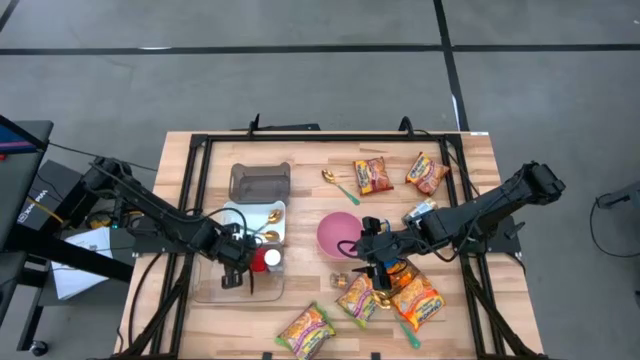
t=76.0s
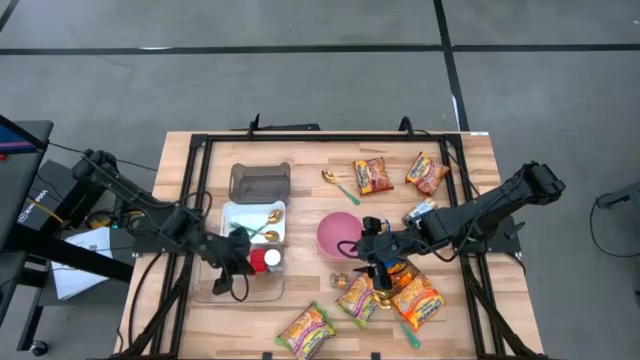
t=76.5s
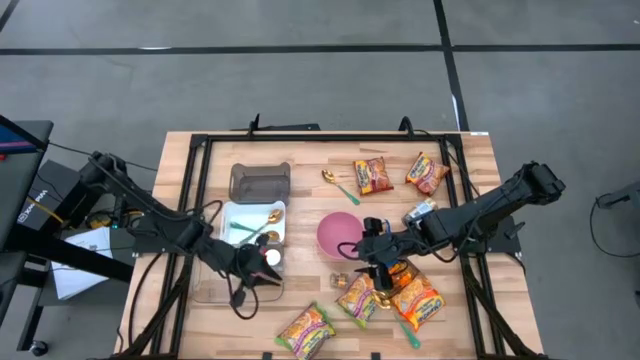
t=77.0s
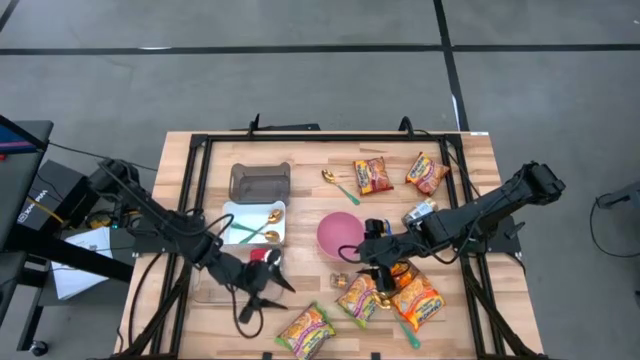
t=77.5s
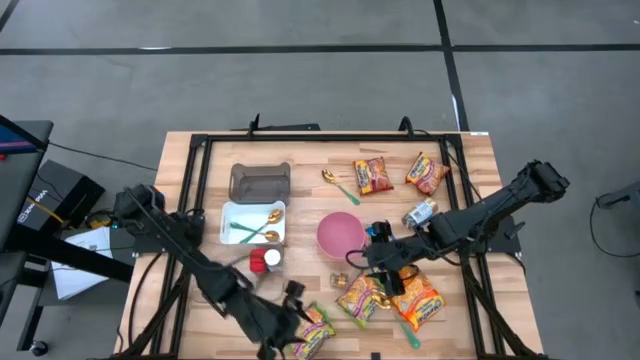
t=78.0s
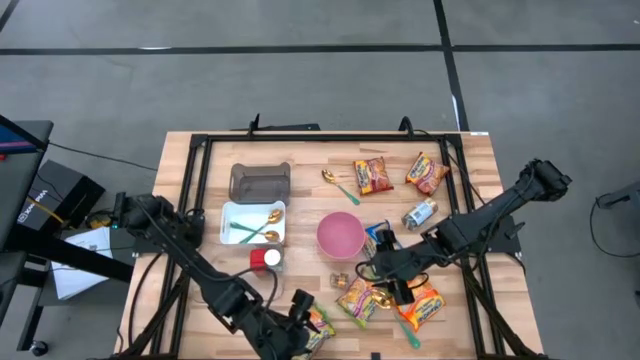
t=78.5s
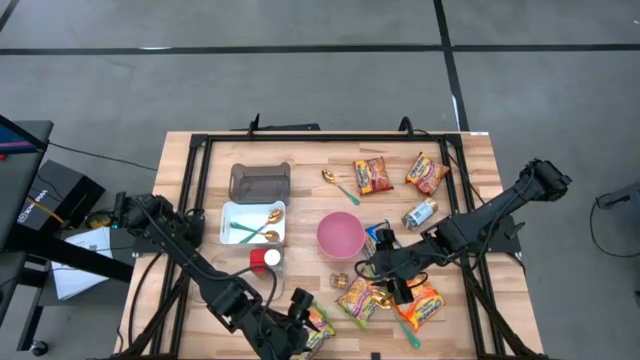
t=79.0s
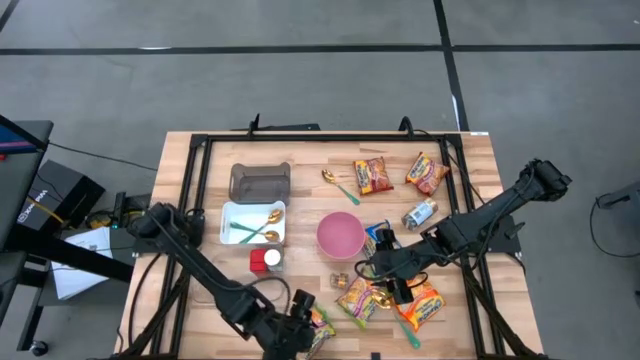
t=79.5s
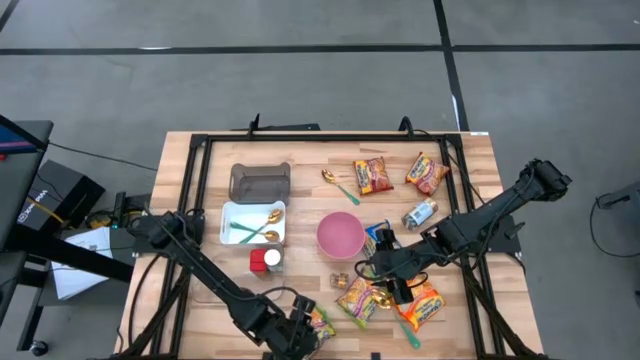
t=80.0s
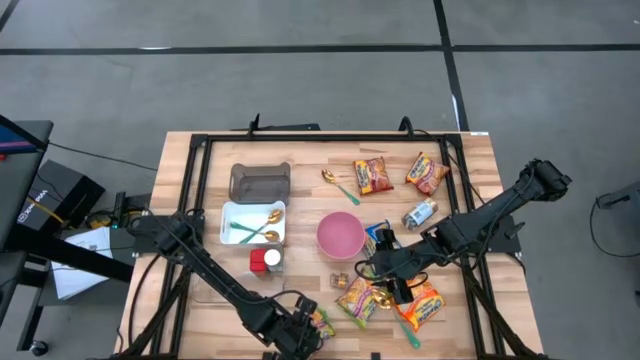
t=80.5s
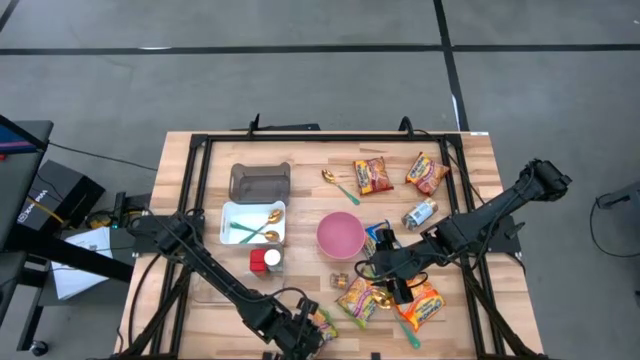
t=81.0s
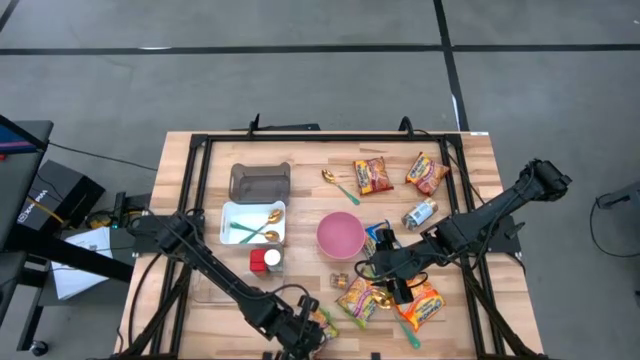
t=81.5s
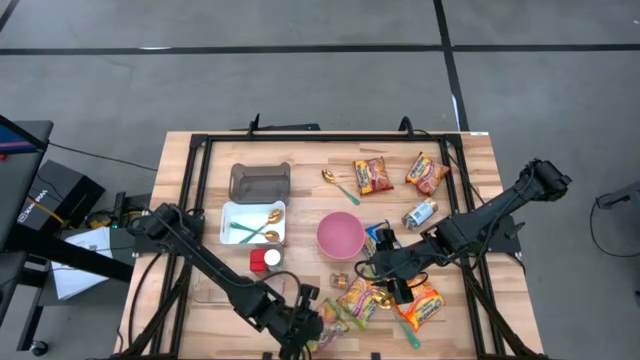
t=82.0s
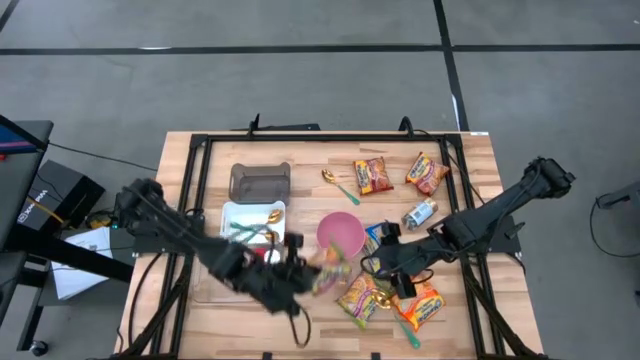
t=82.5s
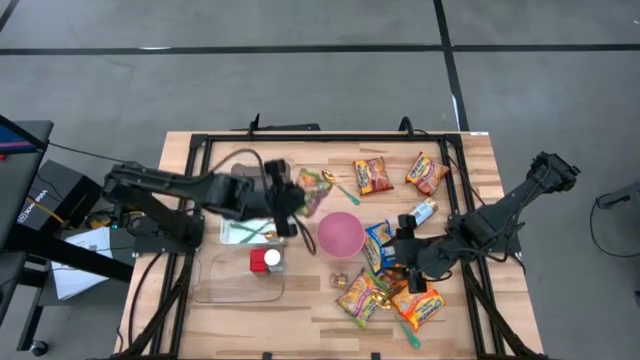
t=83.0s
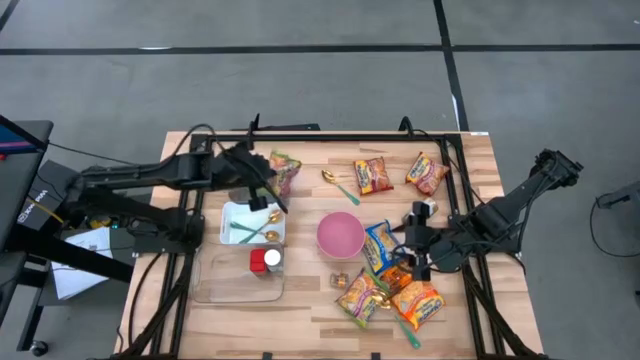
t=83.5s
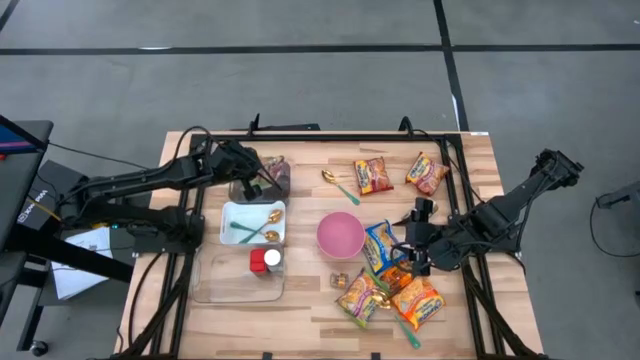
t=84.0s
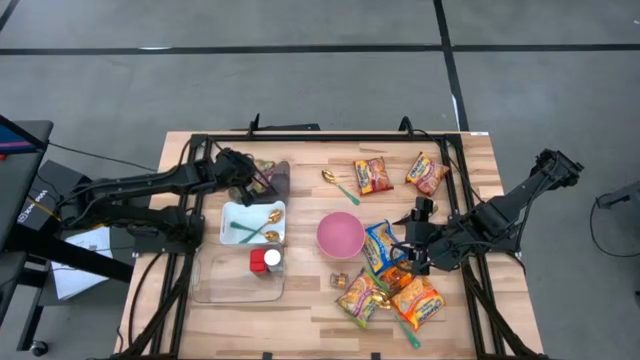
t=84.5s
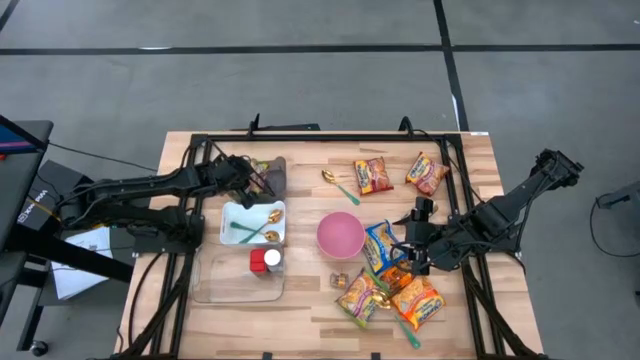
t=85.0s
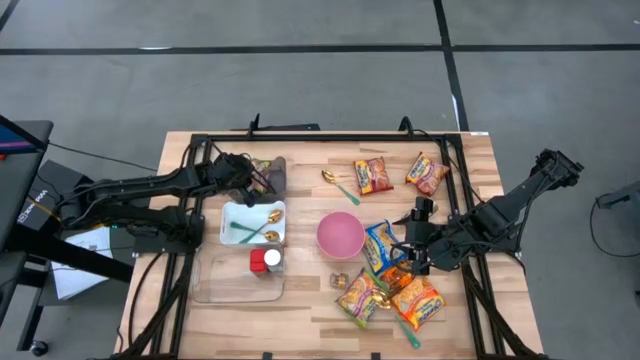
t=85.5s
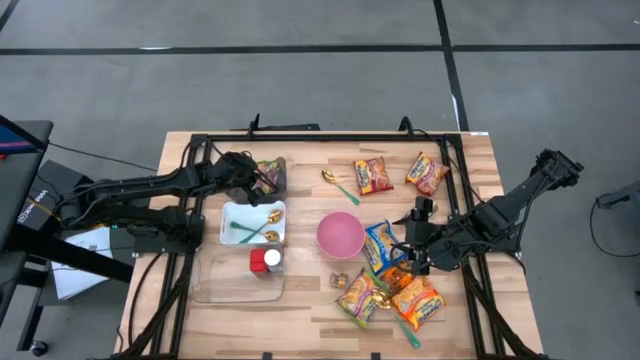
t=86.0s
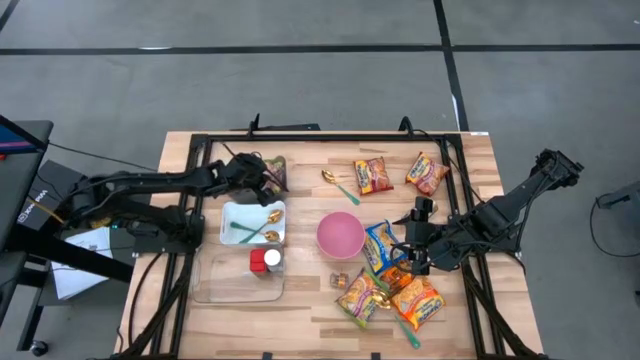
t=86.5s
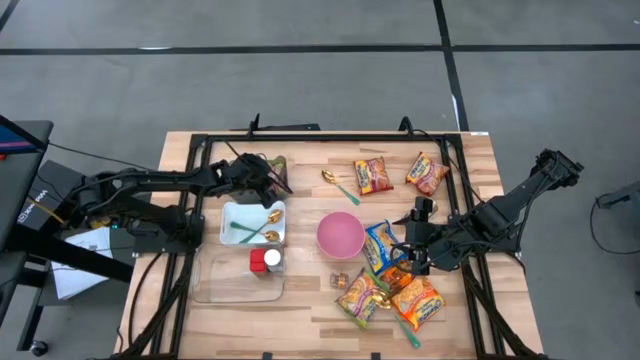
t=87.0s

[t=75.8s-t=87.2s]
Task: Pick & Place Food Item
Put the green noodle pack into the black transparent bin

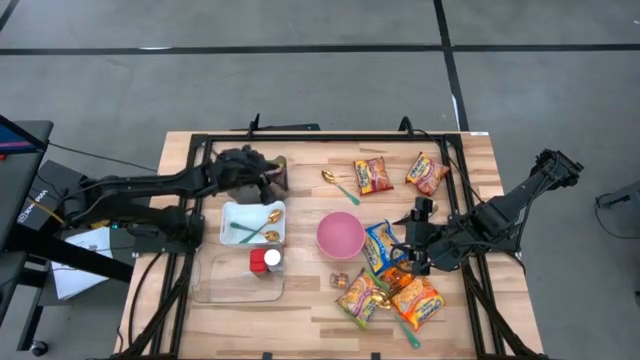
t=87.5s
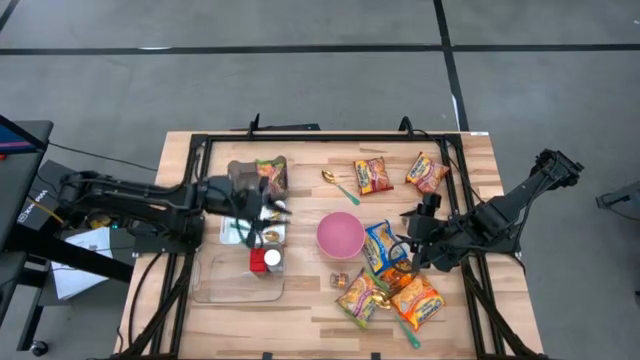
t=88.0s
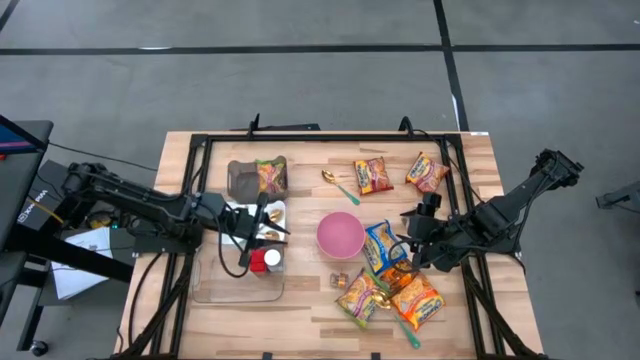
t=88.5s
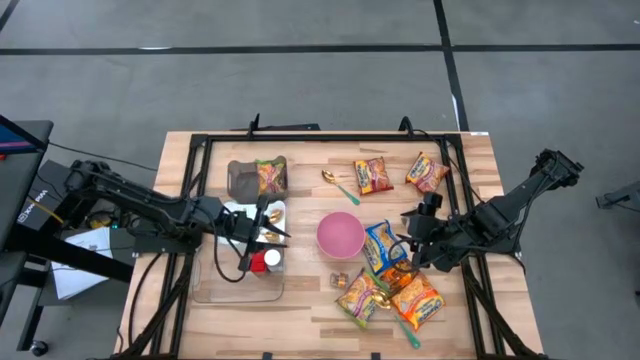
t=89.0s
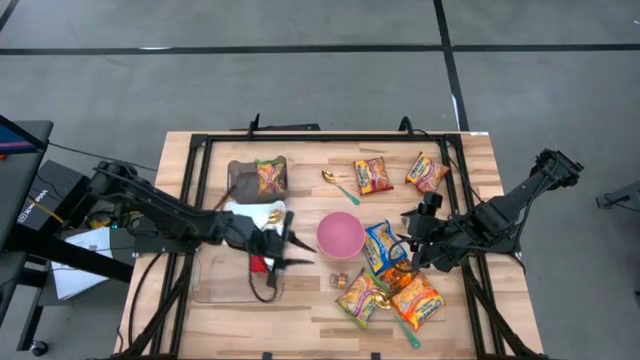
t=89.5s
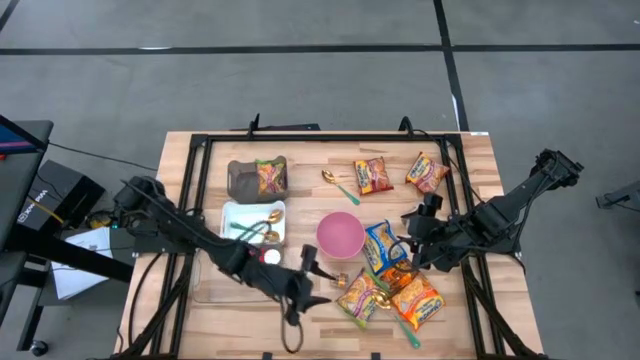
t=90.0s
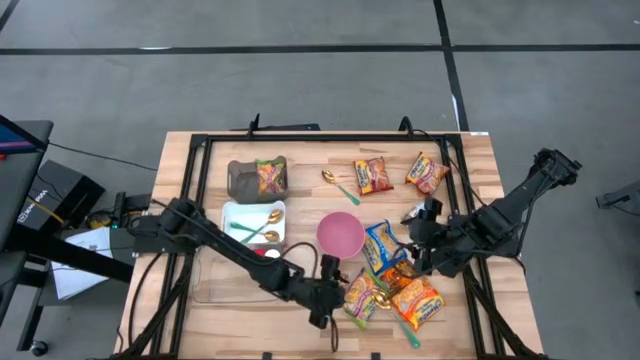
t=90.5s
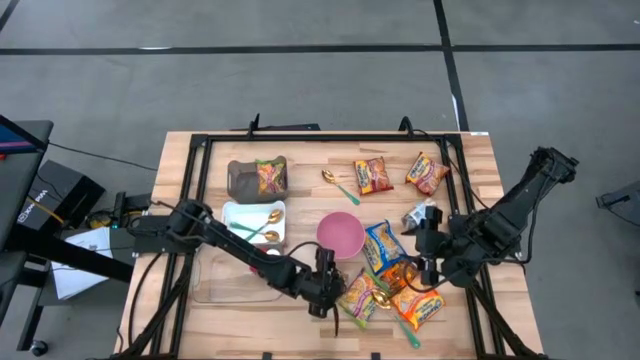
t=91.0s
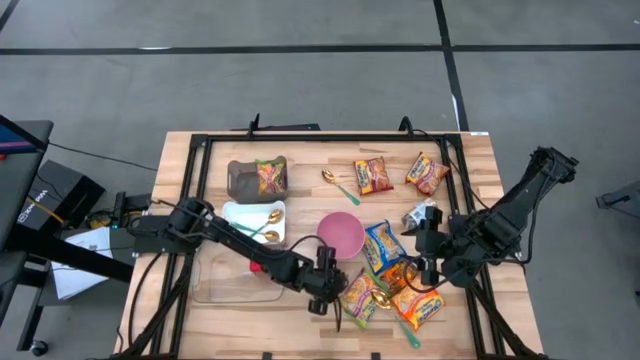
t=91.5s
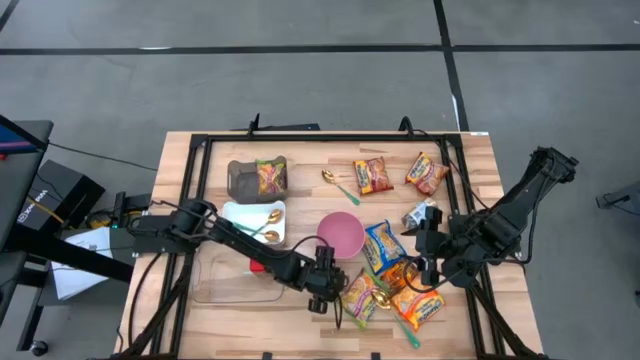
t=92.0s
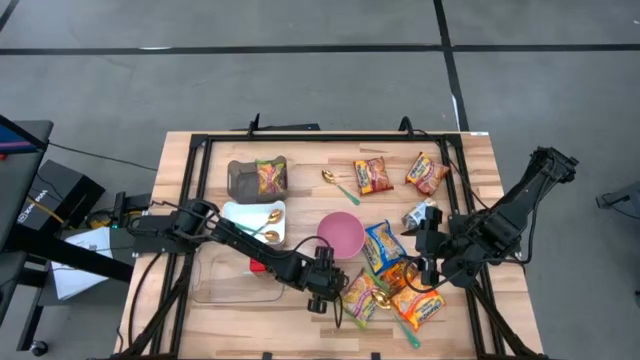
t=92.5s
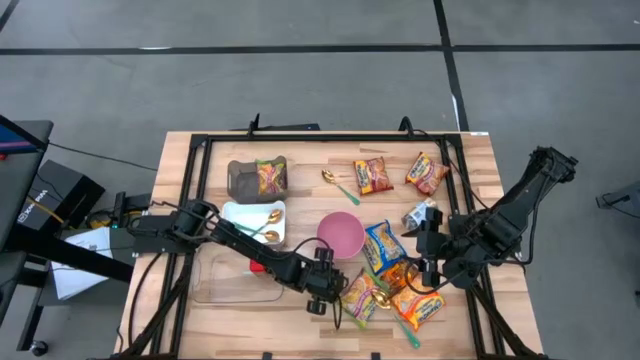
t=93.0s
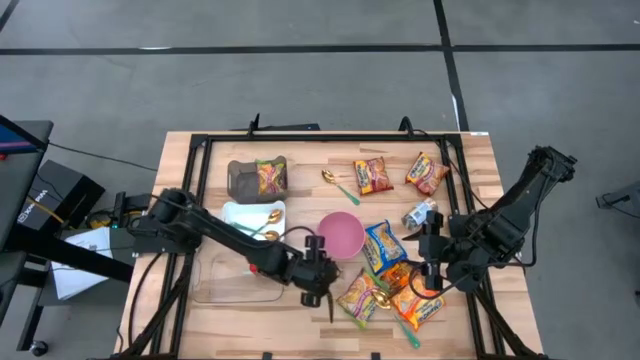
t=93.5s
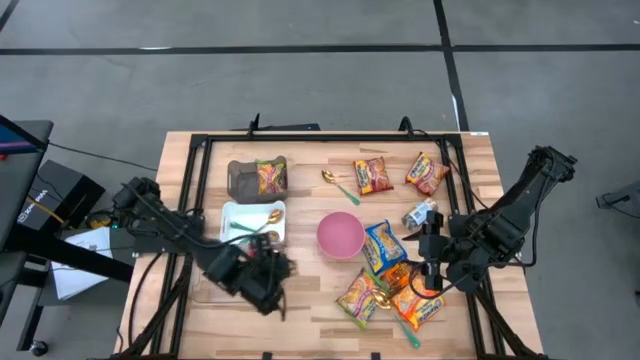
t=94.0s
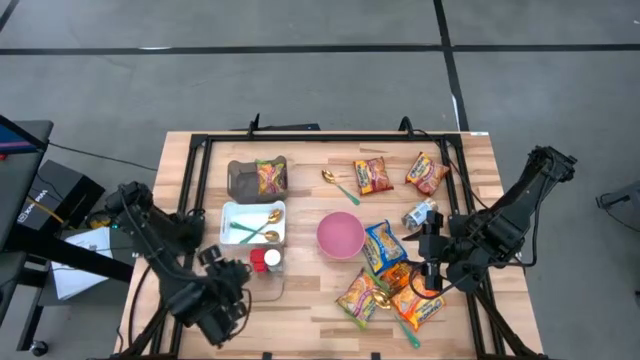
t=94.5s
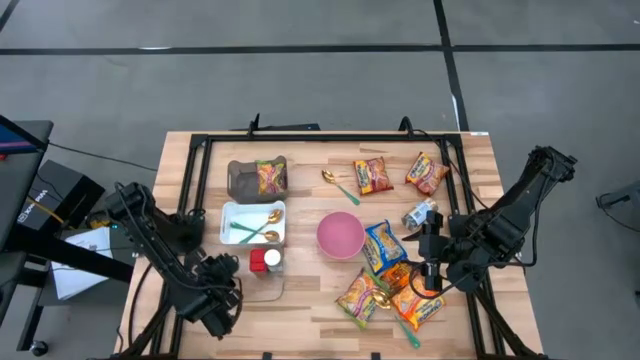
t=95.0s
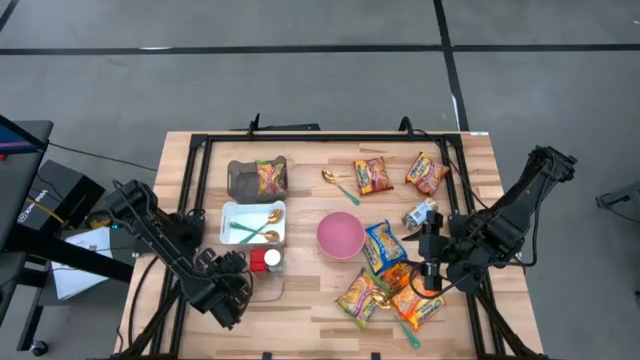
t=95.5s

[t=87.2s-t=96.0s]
Put the brown spice bottle into the transparent bin

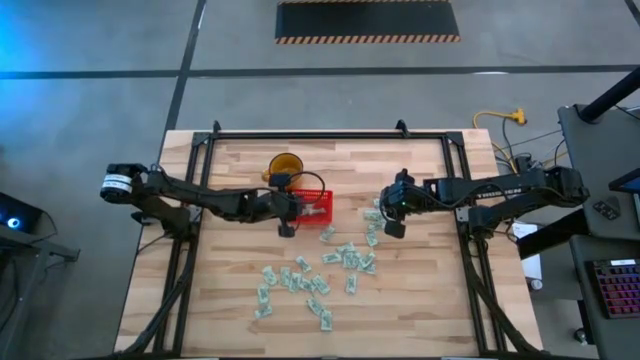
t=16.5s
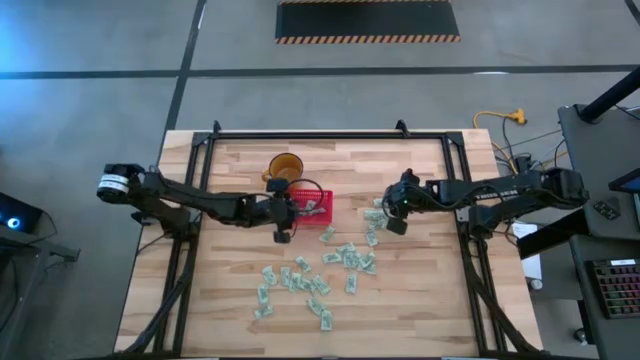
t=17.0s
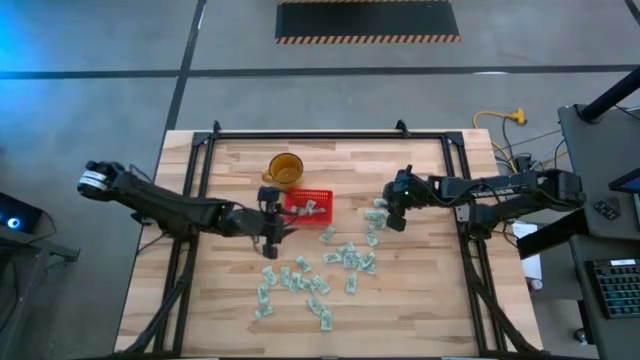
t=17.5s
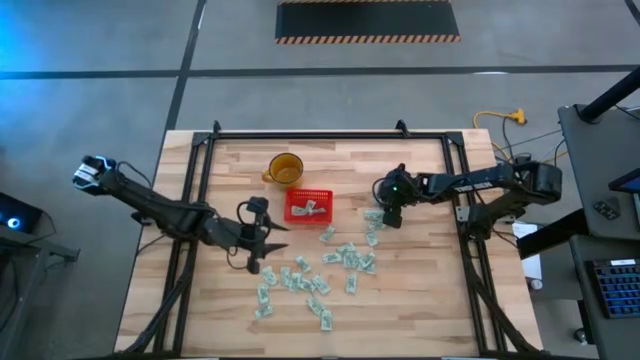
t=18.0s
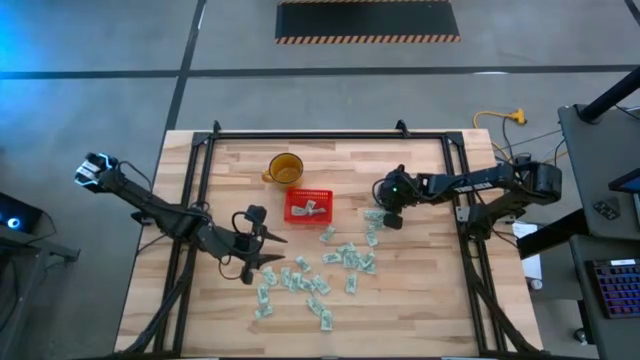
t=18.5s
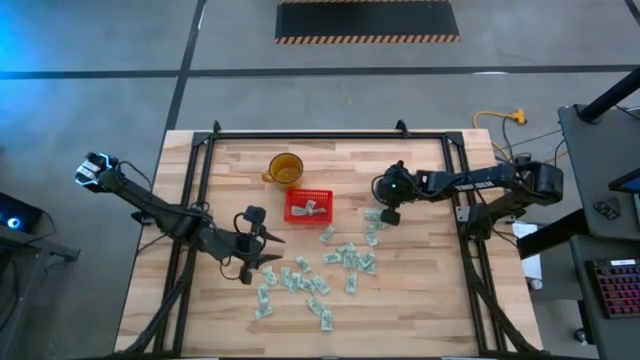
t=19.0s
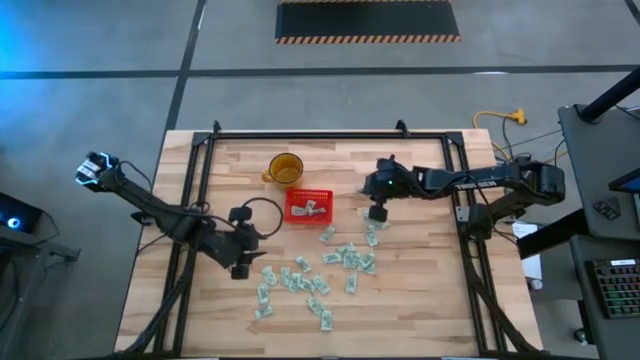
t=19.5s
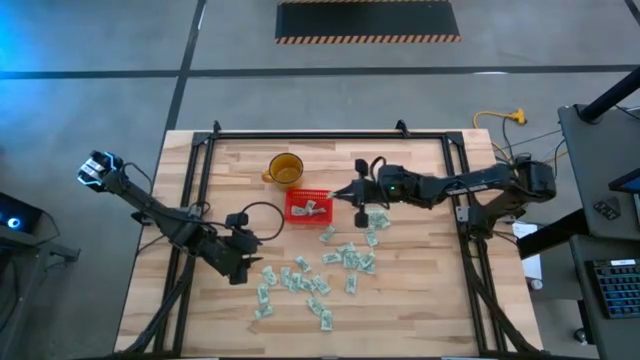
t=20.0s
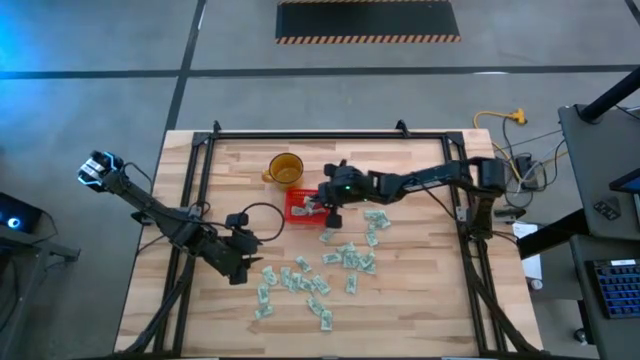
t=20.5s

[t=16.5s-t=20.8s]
Task: Pick and place Stevia / Truvia into bins
Put the gray stevia packet into the red basket
